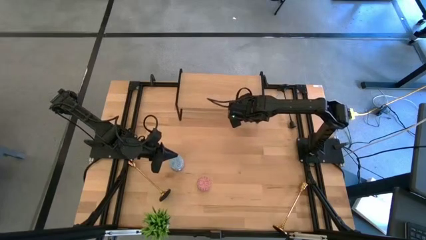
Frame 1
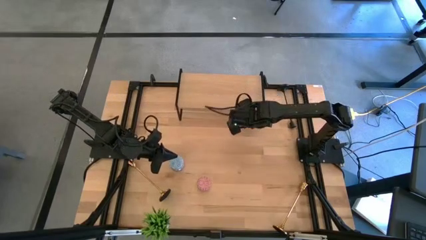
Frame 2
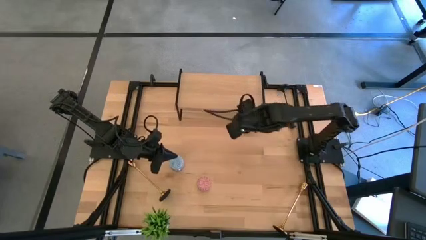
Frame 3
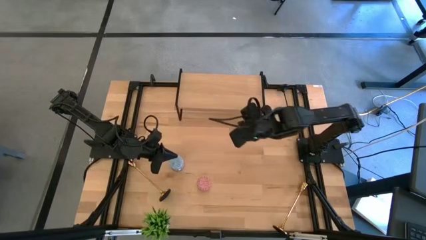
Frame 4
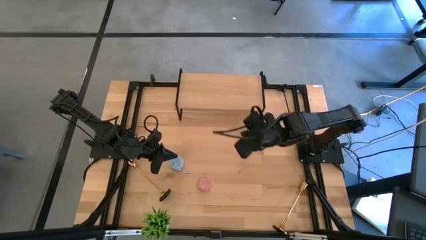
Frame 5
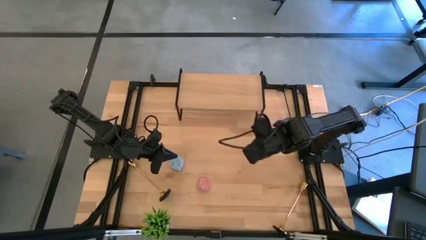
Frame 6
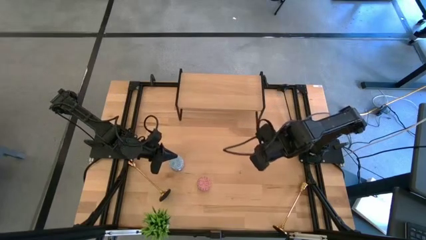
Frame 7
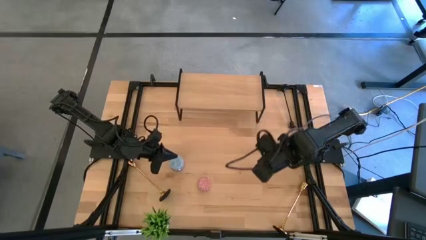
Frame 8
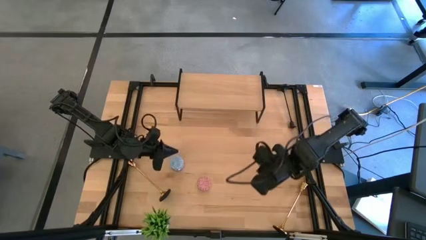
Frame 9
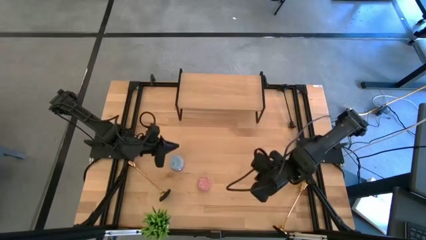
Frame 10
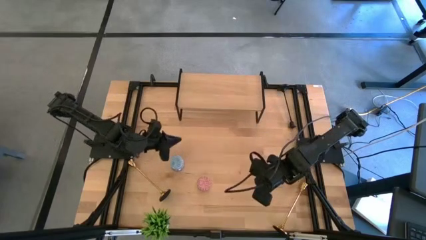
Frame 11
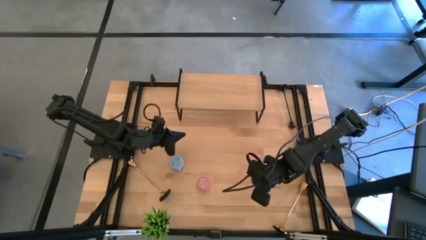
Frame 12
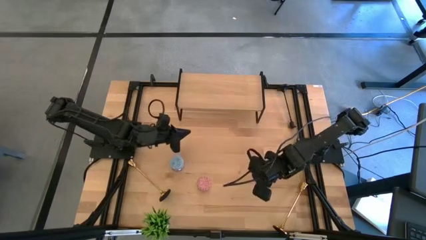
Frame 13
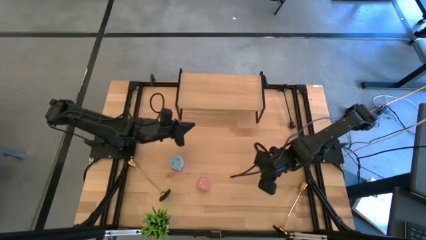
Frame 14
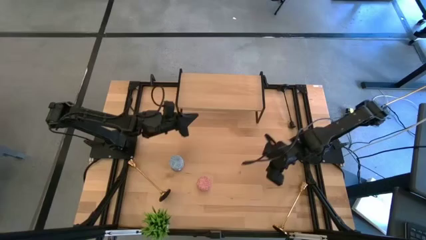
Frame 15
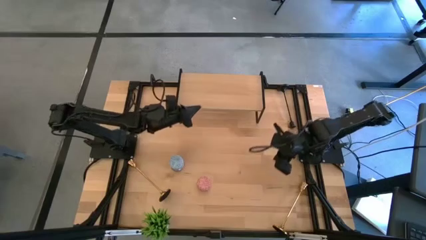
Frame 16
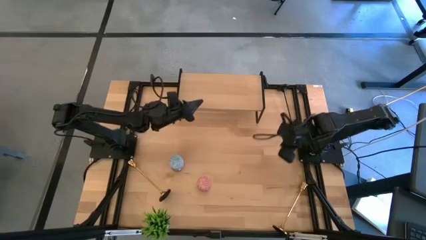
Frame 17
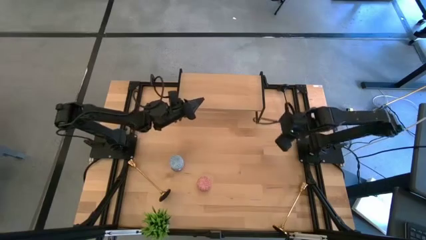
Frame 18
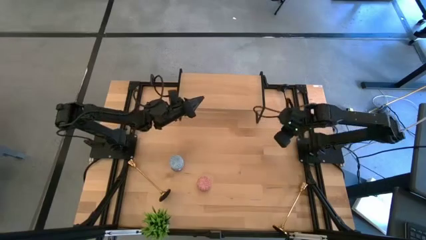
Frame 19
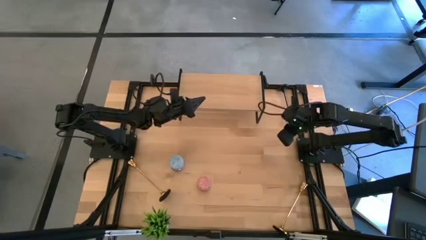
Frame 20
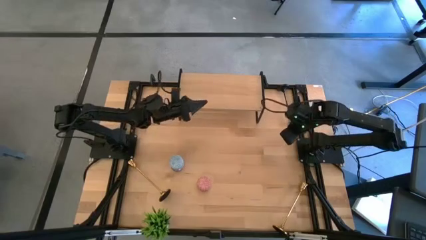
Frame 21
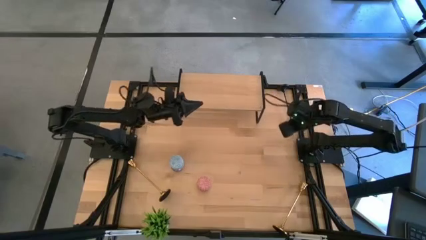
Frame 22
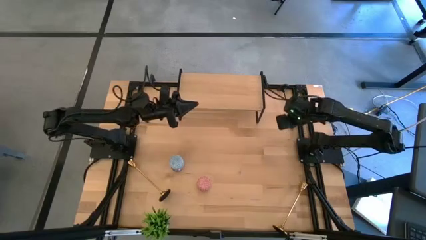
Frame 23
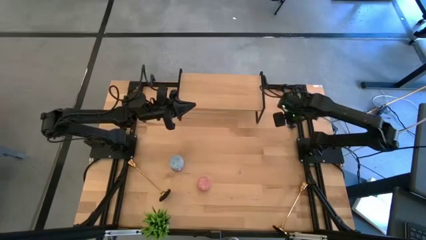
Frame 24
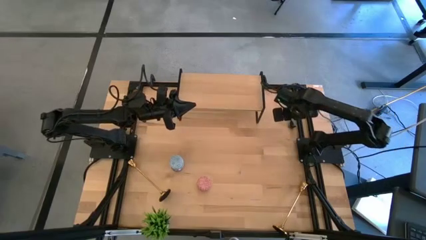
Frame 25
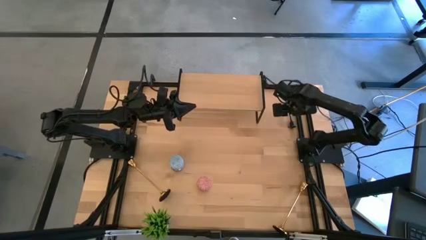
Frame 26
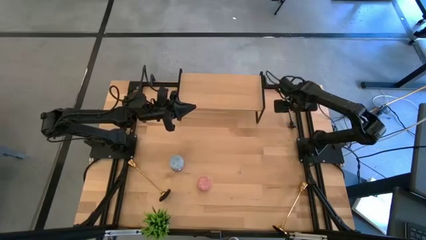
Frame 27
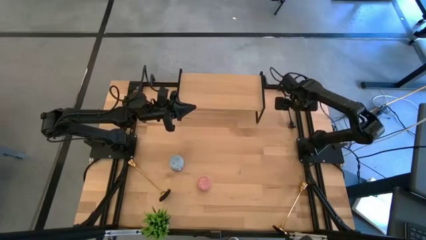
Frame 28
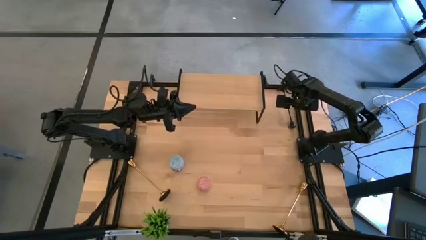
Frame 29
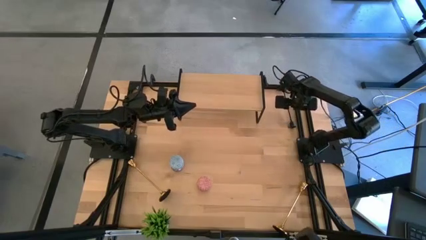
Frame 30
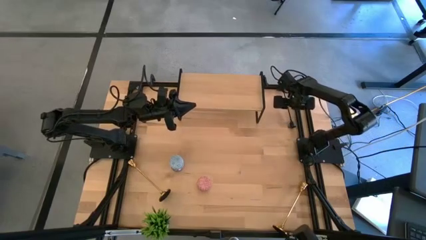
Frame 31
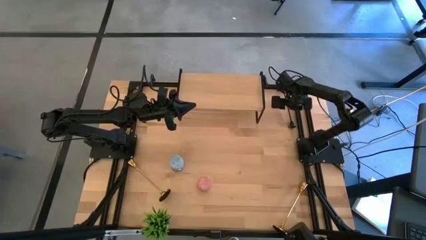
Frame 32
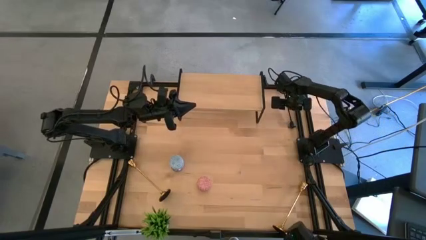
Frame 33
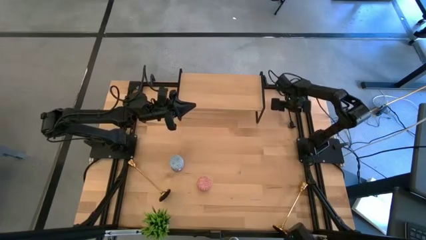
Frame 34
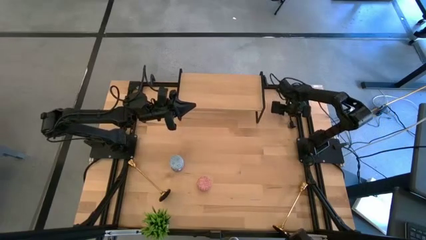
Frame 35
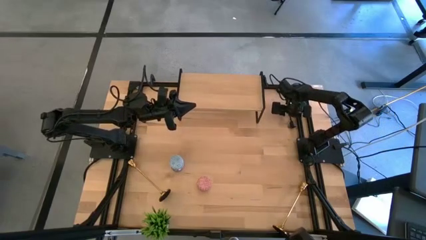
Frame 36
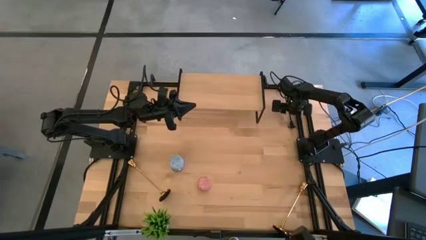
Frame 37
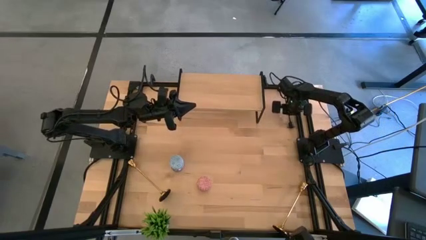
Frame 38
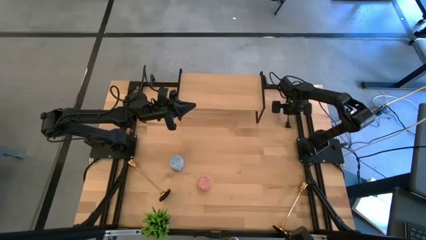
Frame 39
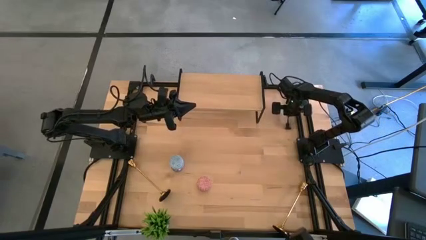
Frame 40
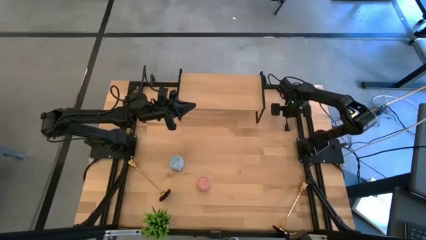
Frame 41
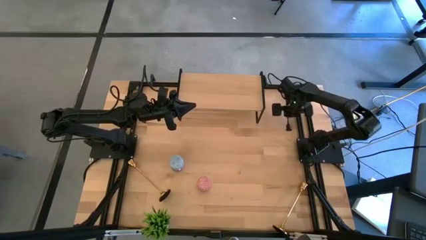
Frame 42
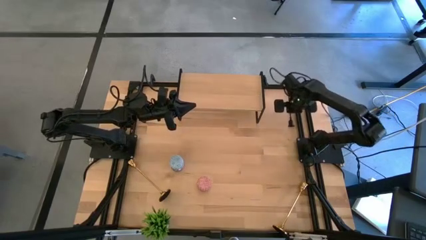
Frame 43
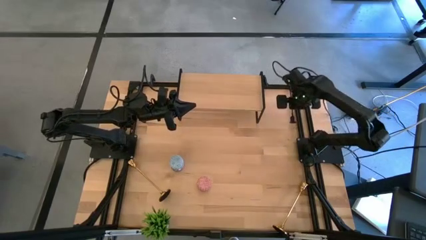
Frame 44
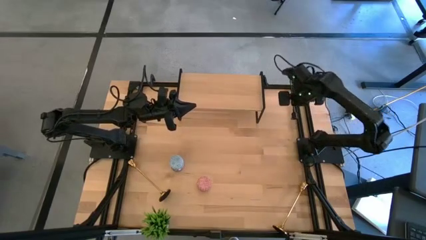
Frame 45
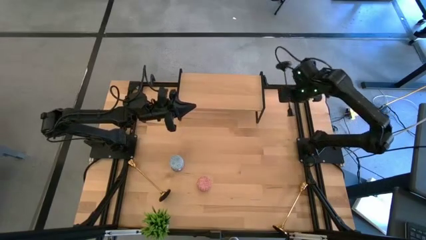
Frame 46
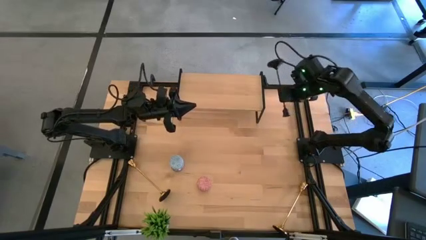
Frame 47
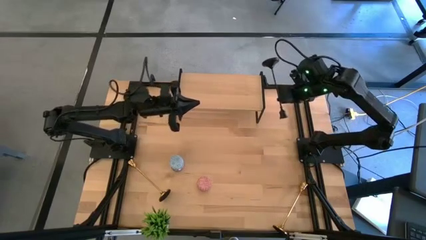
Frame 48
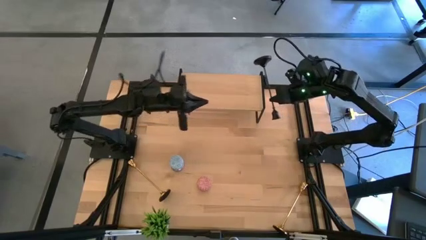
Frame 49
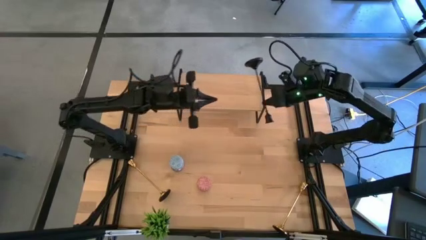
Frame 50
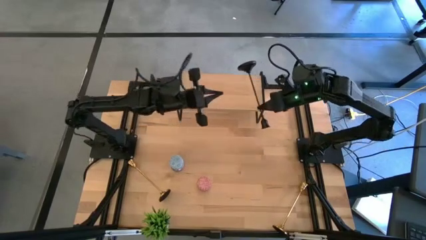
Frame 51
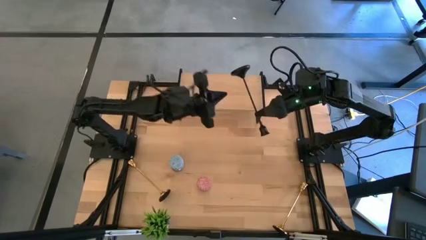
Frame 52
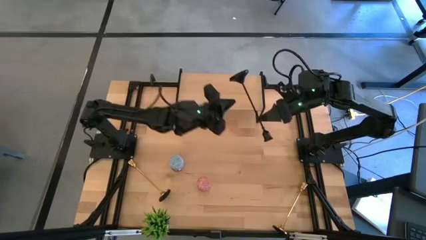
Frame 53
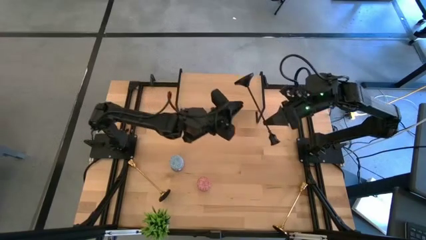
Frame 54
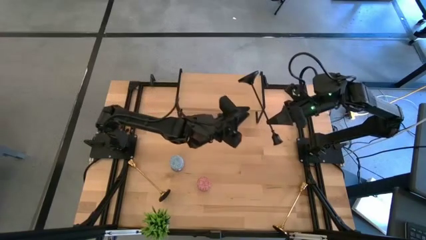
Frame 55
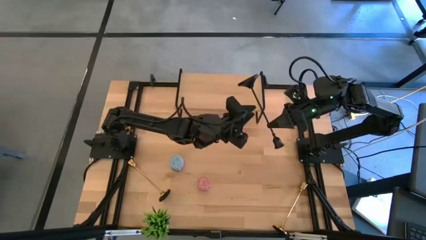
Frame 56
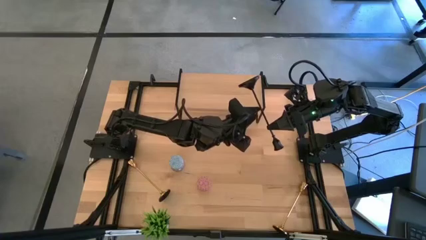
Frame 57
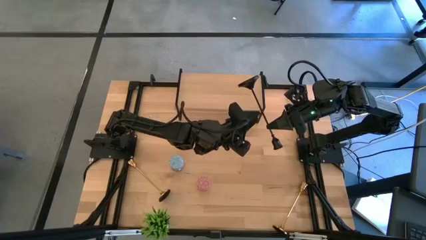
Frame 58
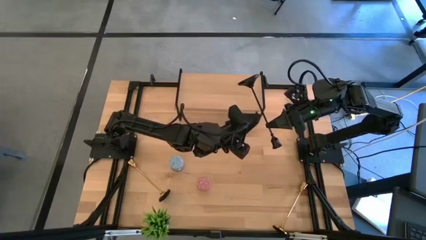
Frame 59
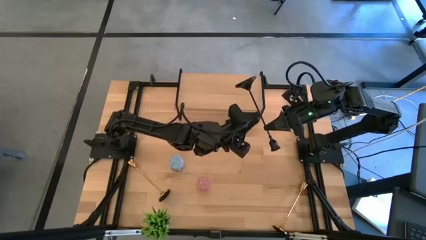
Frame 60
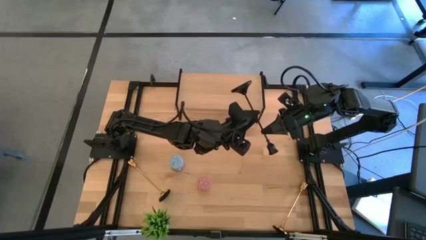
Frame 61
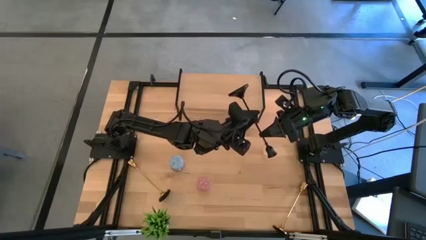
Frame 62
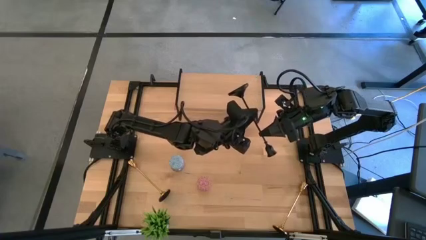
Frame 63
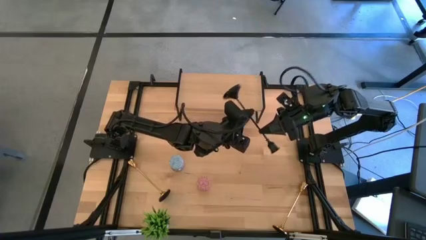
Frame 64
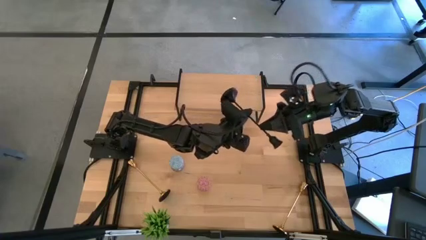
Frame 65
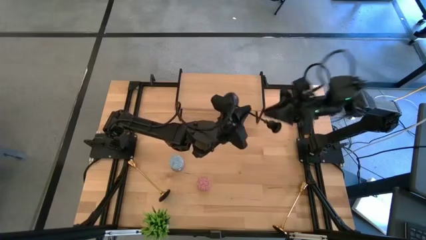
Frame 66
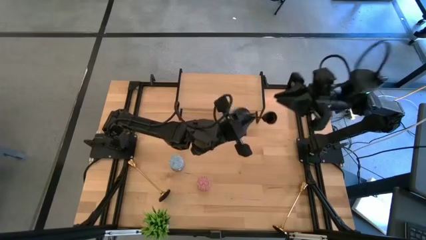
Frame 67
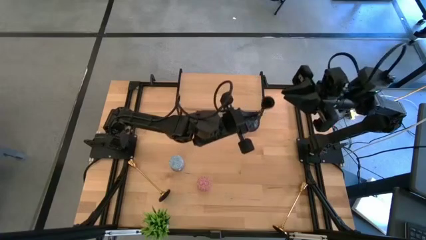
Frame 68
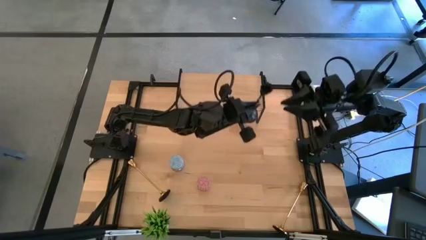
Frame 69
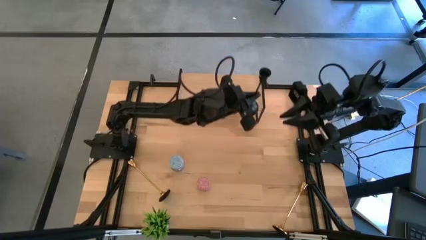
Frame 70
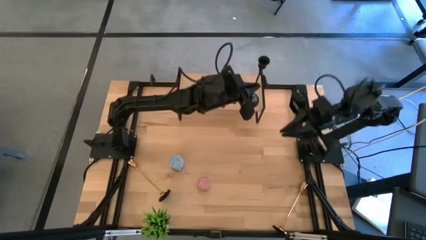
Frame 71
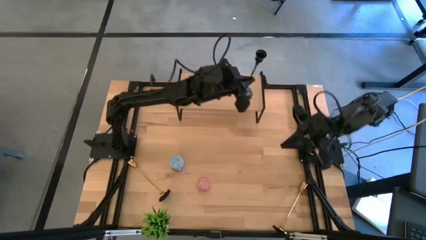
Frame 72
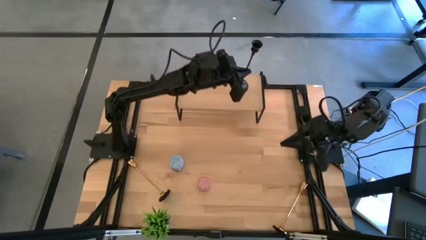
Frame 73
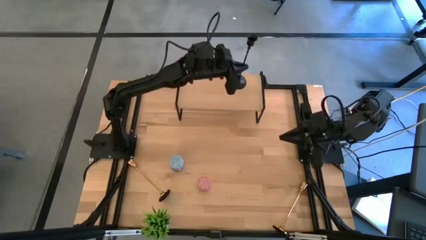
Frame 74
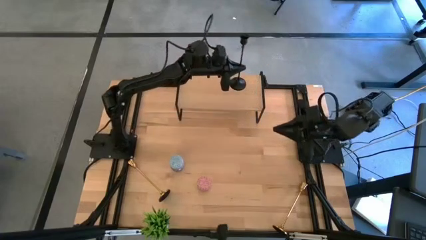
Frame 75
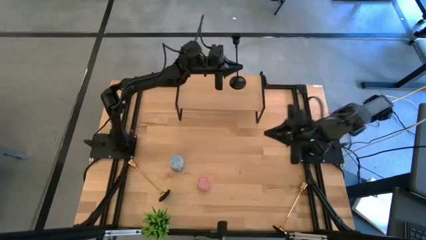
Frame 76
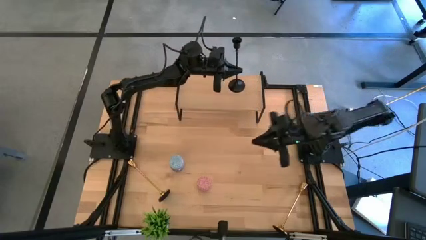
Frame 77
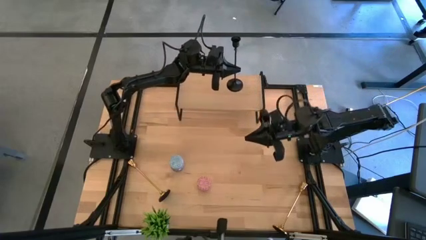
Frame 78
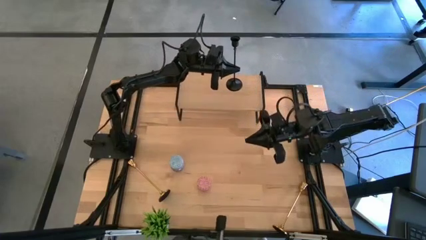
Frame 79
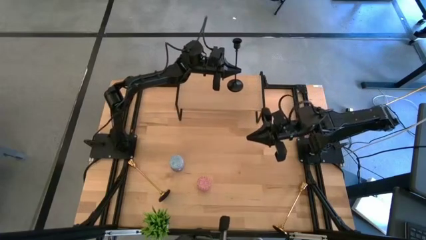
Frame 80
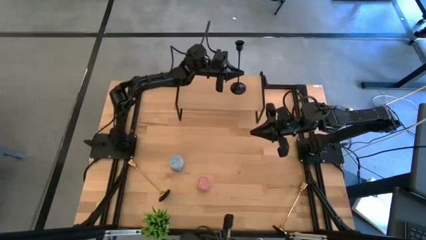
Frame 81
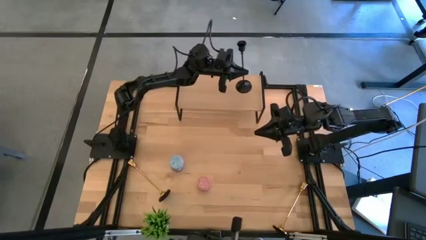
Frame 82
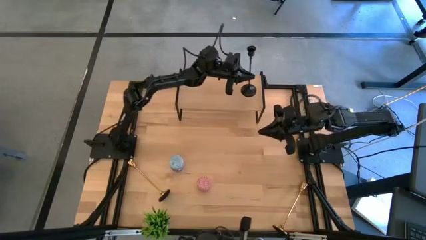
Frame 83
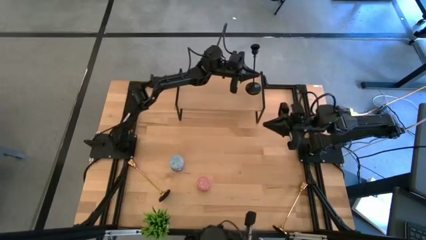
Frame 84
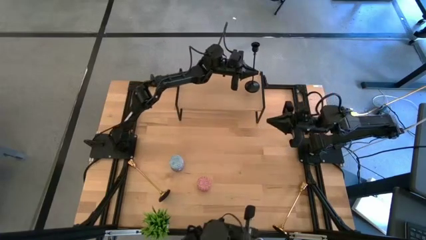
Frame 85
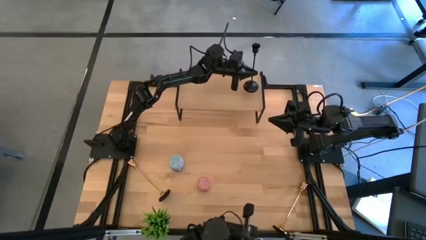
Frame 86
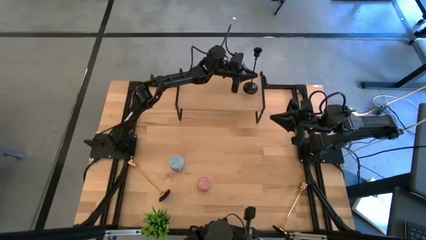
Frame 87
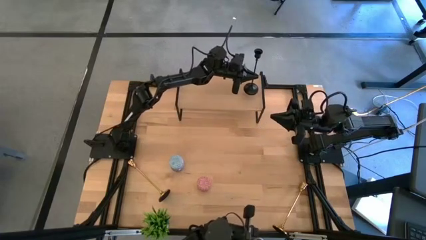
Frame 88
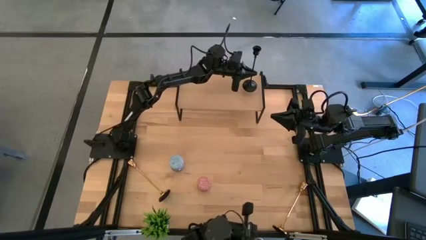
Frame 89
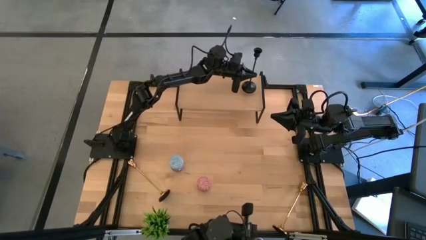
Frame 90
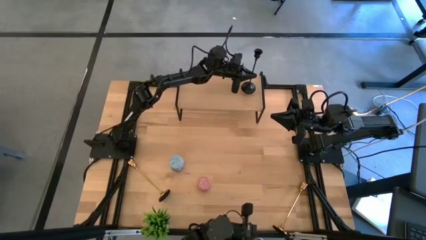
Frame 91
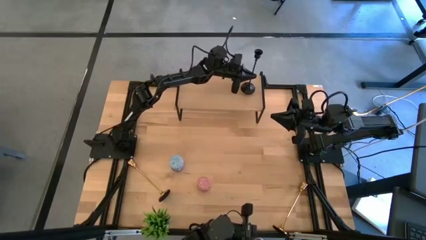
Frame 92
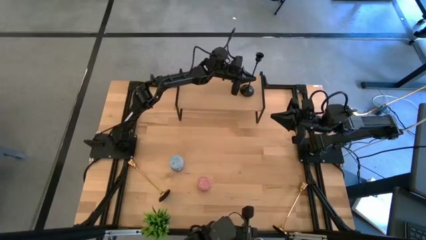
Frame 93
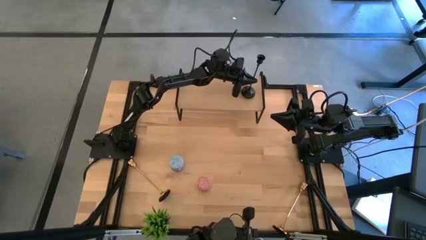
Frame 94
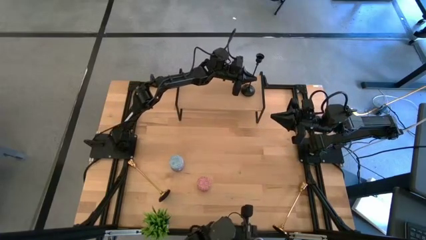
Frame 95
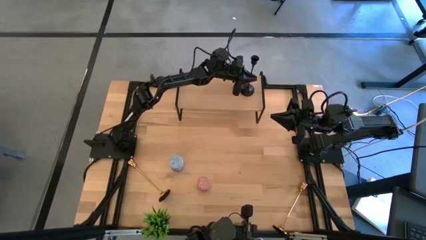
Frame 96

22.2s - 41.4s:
Task: Pick & Place candle stick holders
Put the black candle holder on the shelf
